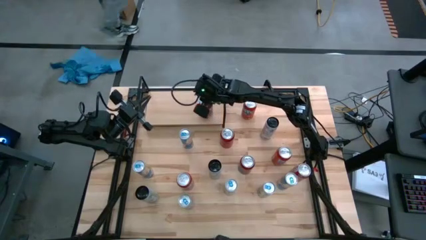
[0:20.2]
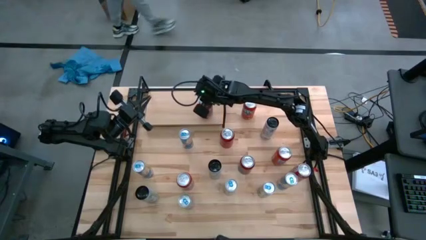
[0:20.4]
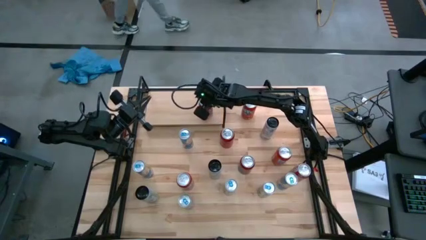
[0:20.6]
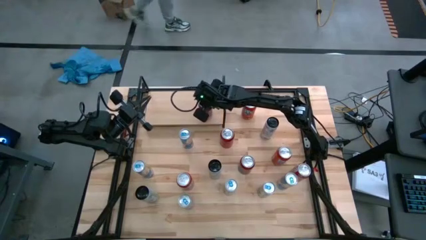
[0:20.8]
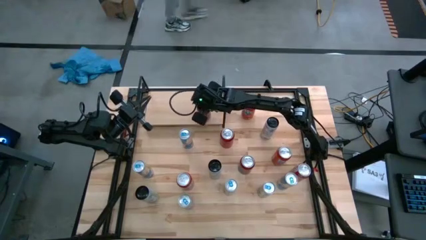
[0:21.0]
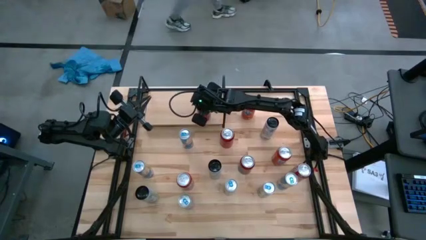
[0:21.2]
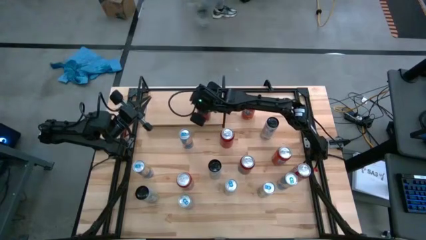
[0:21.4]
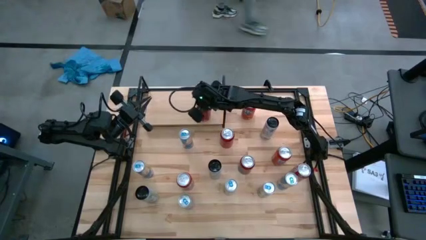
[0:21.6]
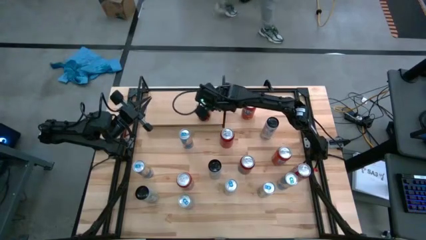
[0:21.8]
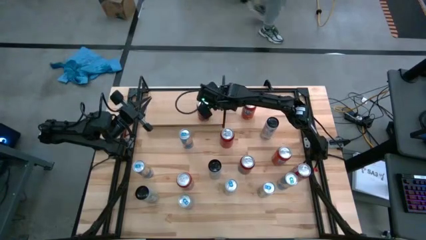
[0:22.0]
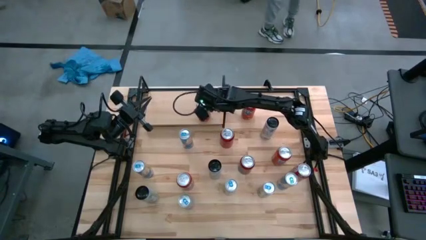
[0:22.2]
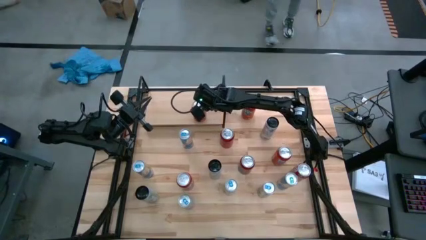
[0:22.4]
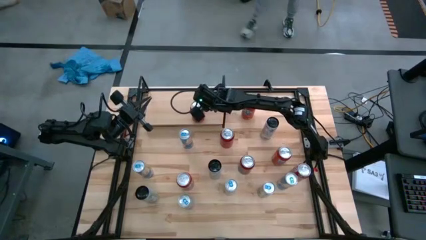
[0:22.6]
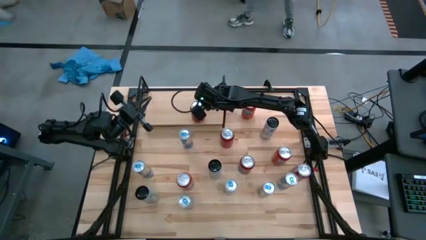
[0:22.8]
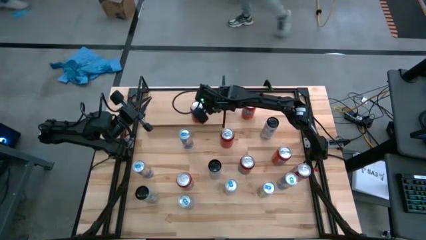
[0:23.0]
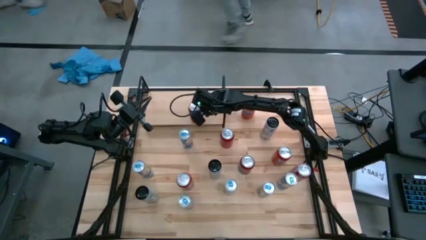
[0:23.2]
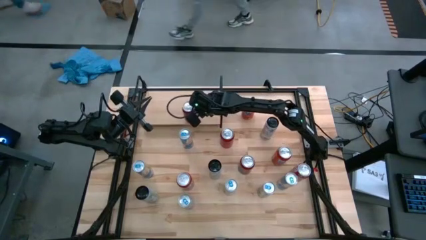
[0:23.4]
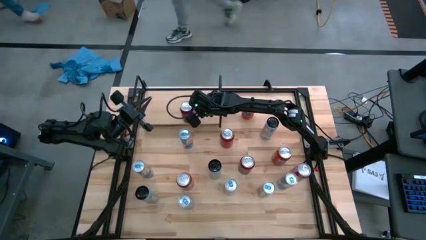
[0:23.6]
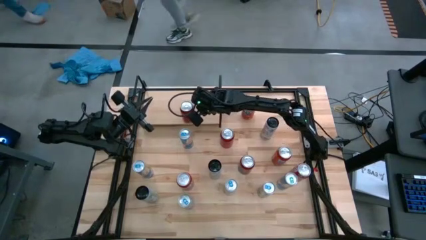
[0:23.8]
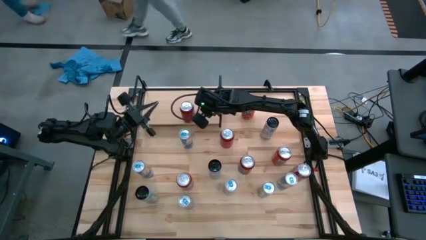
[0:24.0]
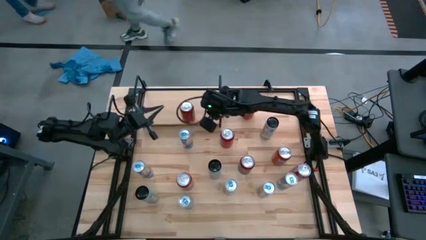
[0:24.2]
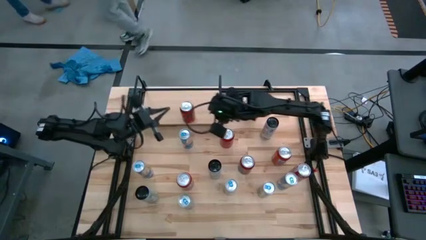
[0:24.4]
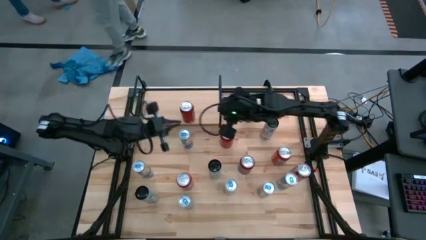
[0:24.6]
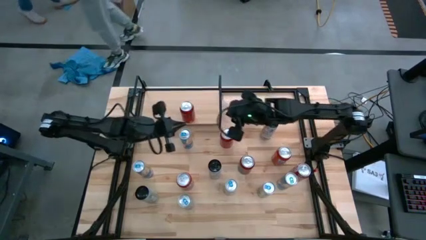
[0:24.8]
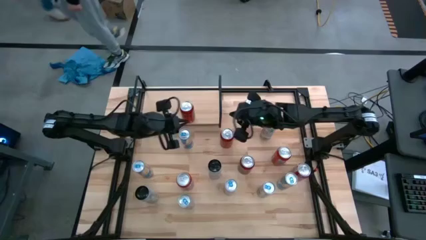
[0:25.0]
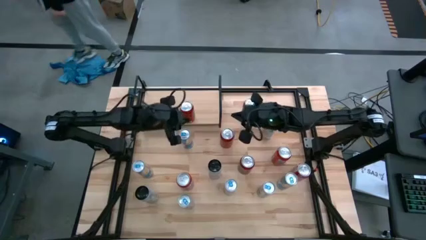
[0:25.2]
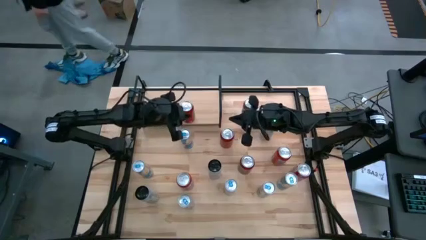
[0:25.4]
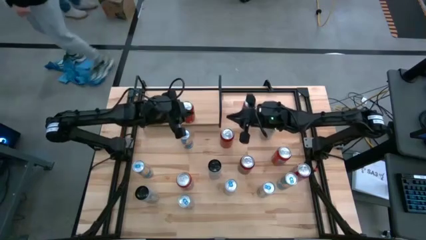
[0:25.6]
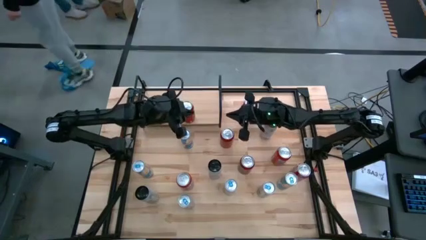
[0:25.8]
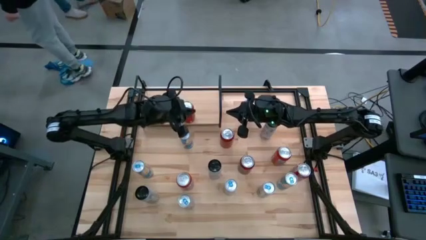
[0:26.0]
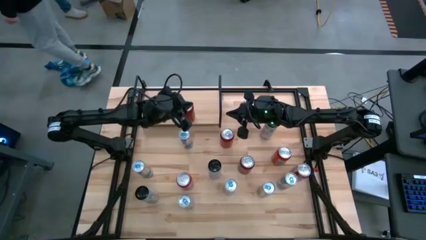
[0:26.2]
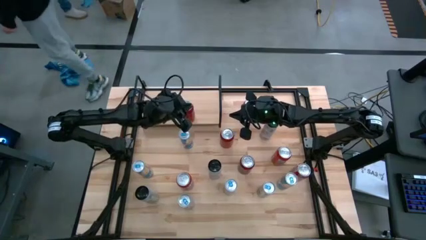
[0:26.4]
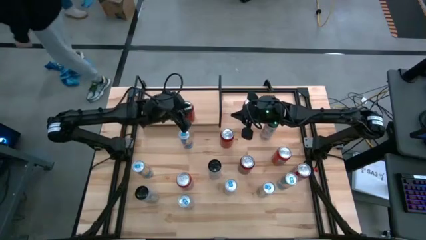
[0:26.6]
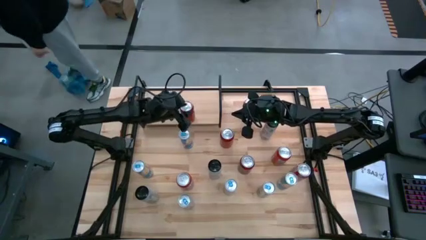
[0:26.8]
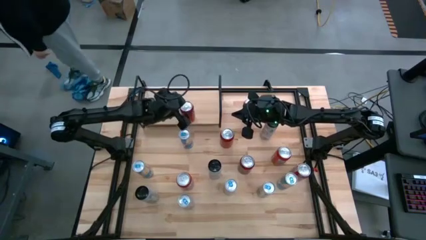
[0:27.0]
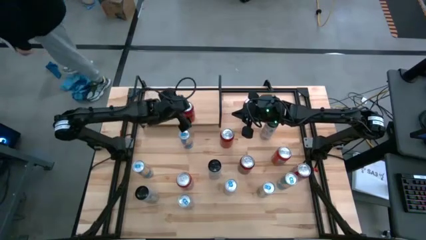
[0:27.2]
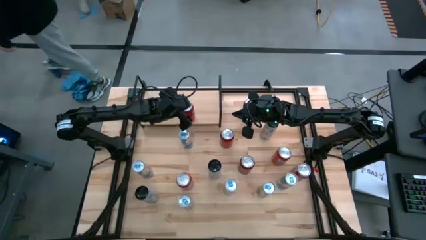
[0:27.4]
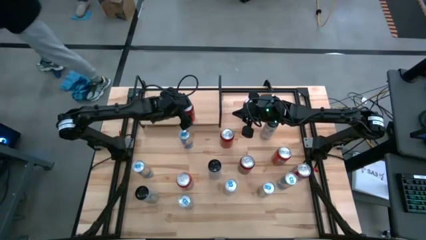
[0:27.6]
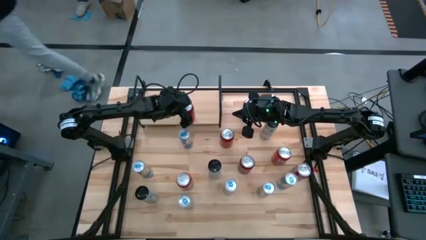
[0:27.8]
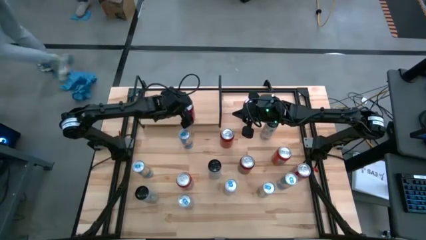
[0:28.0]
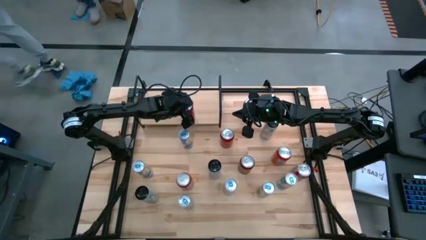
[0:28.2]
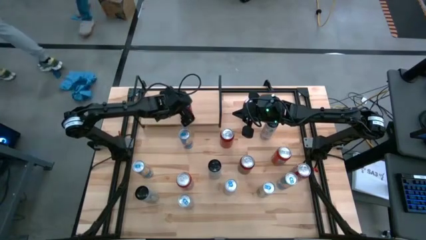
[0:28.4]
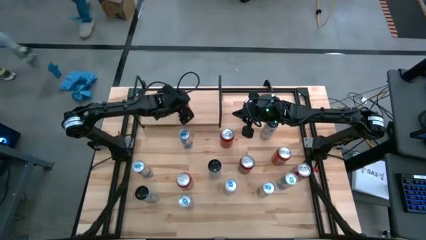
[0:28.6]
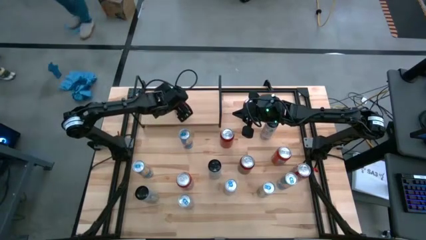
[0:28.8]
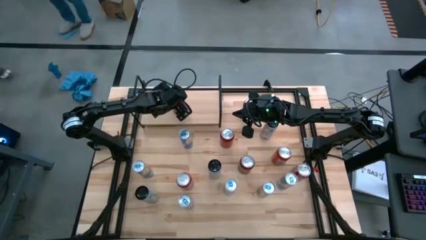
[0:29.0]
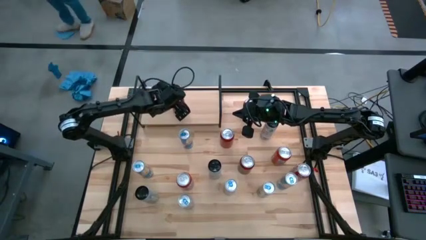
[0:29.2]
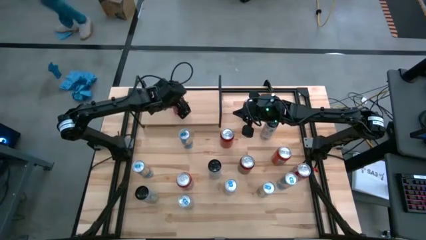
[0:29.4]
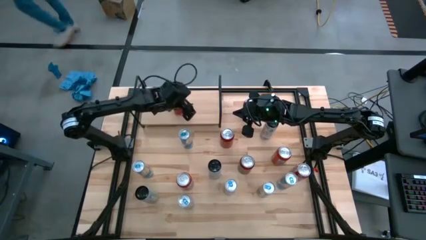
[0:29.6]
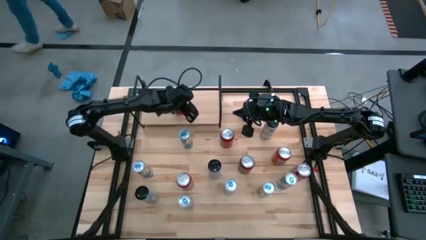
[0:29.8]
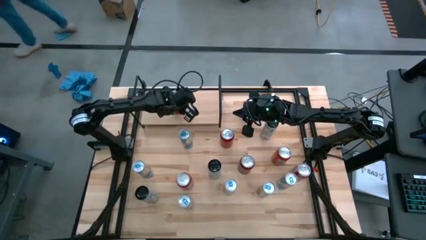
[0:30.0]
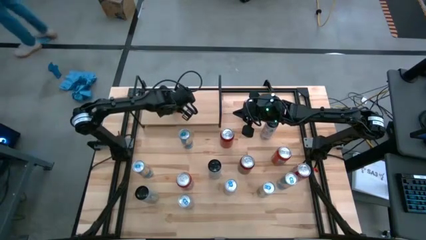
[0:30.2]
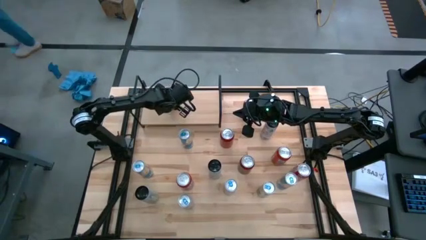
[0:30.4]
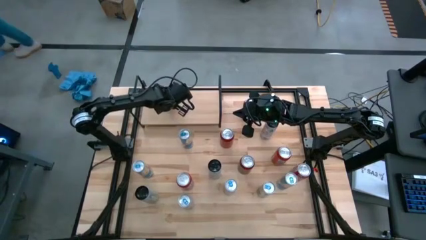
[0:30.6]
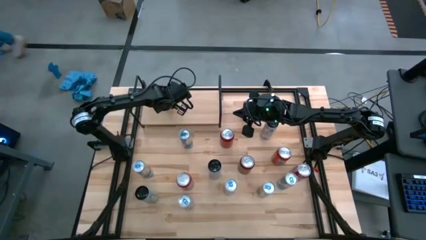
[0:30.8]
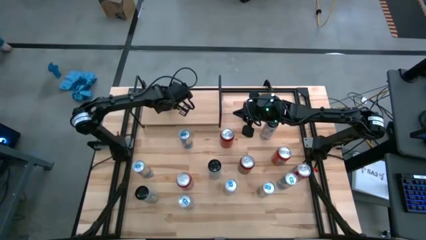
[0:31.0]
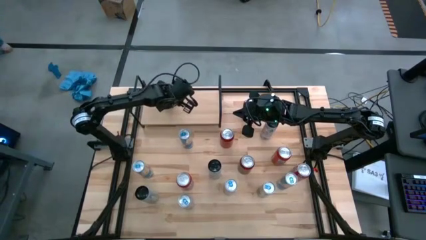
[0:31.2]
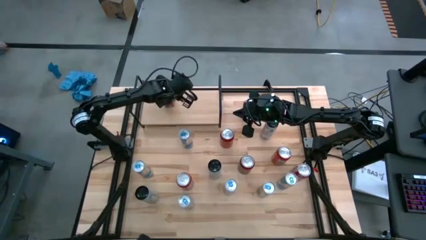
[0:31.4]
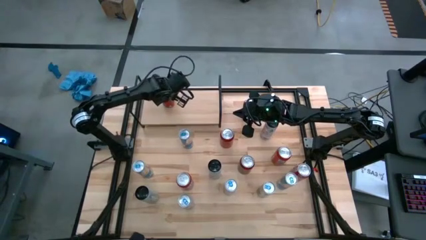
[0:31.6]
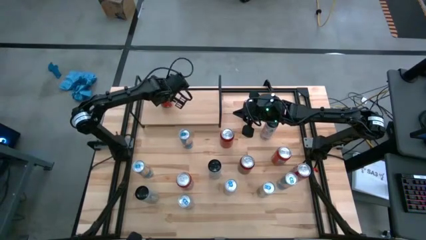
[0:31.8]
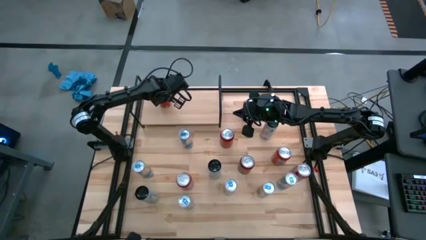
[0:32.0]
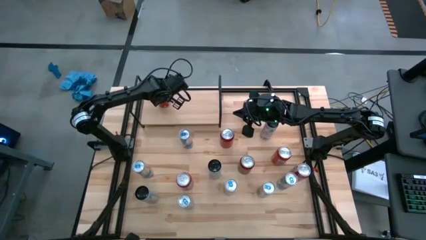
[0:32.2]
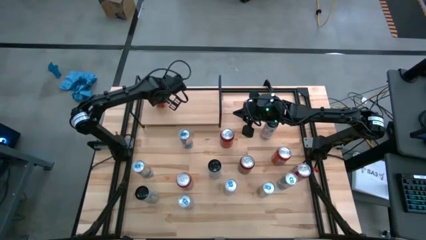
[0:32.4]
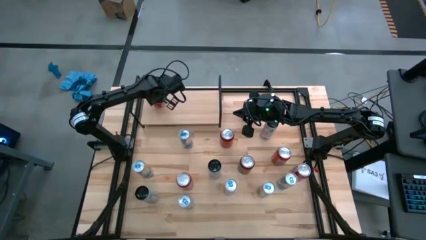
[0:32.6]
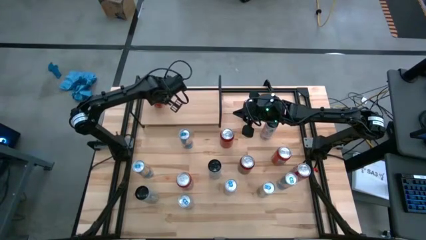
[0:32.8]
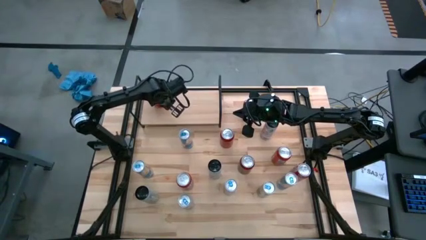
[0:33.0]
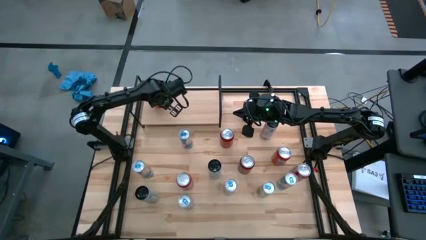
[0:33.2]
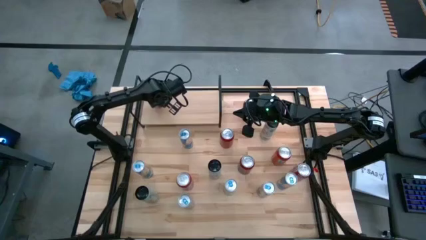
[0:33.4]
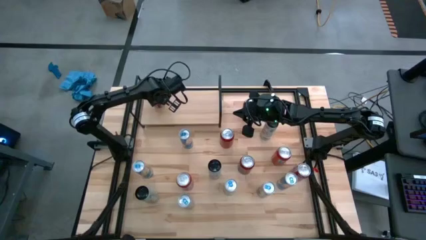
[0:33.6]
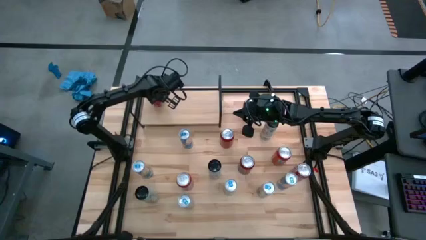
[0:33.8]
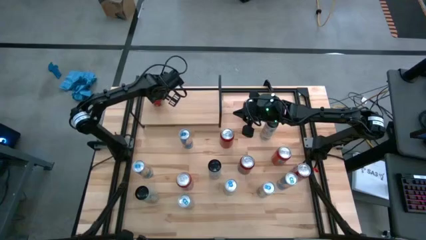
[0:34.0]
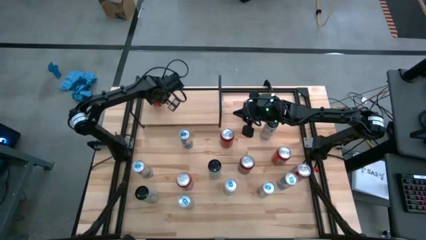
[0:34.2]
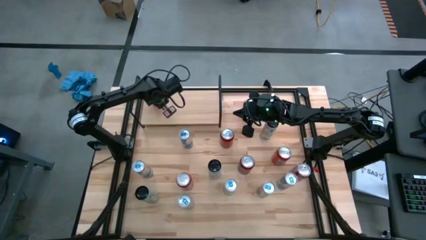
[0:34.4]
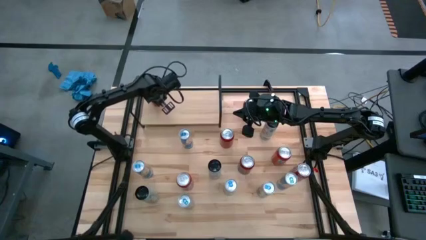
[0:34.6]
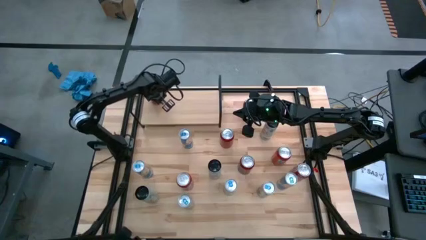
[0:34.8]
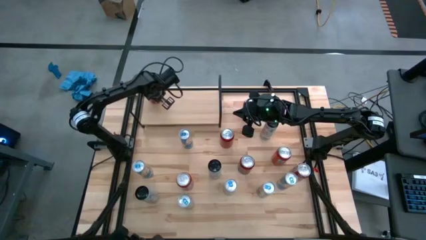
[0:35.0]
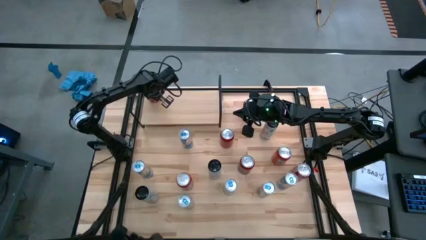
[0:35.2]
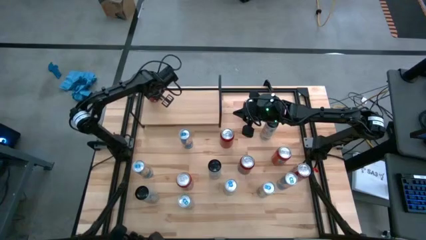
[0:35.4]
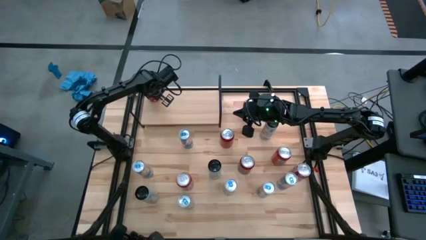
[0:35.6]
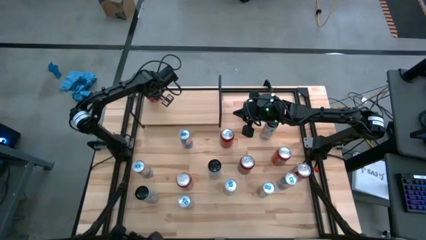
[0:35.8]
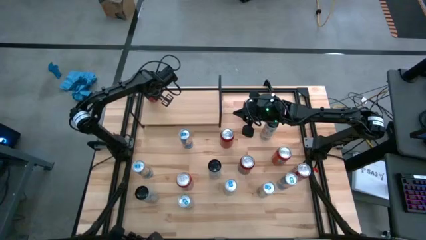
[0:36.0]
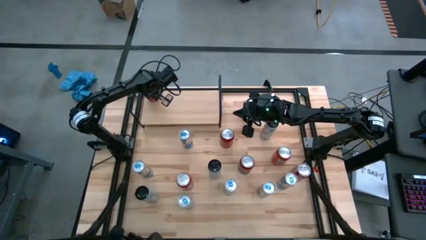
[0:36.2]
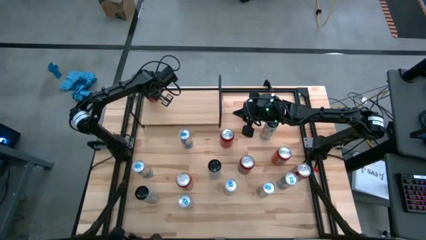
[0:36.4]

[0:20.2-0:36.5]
Task: Place canned beverage on shelf
Put the red/black soda can on the shelf
